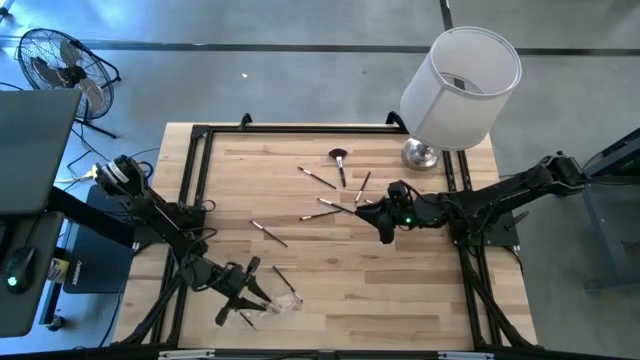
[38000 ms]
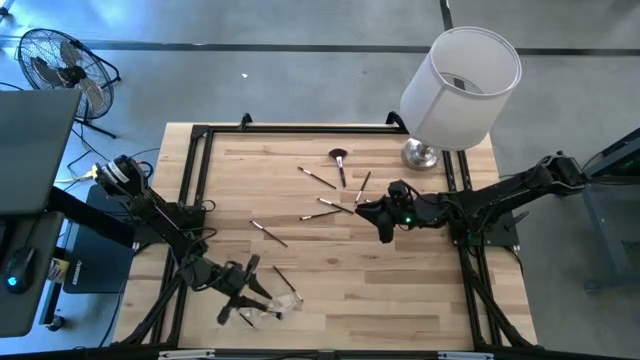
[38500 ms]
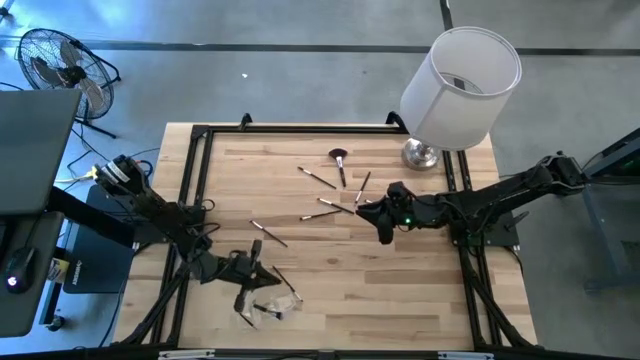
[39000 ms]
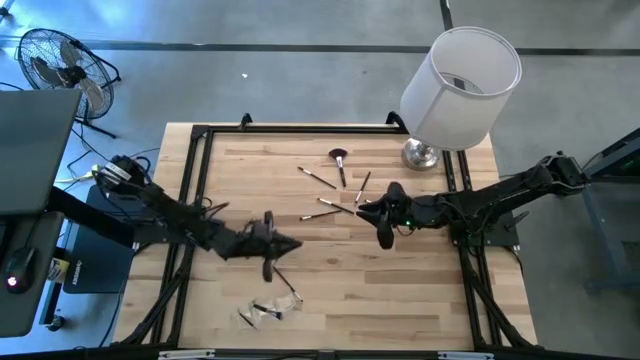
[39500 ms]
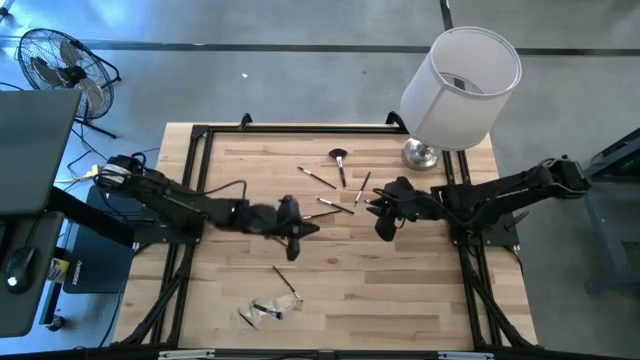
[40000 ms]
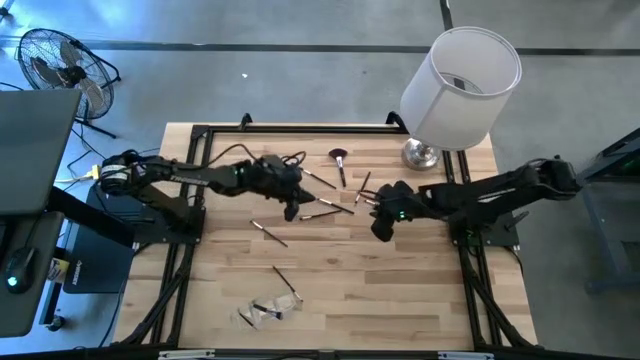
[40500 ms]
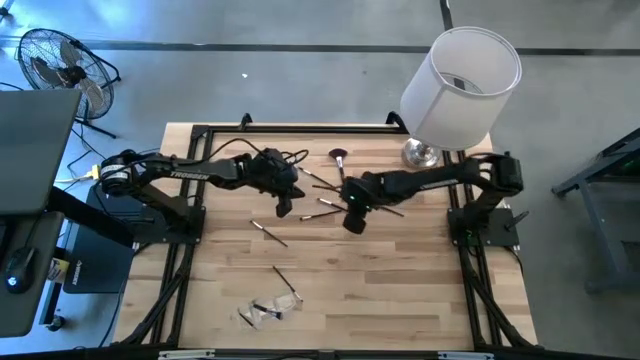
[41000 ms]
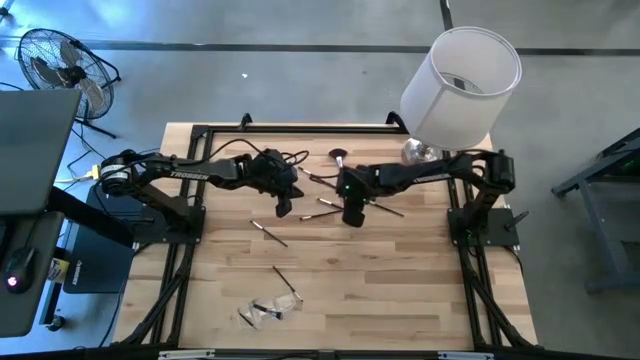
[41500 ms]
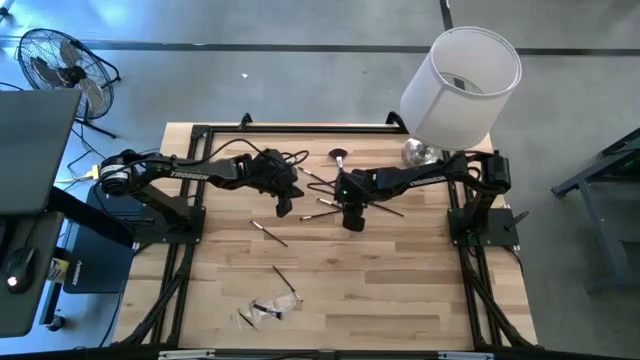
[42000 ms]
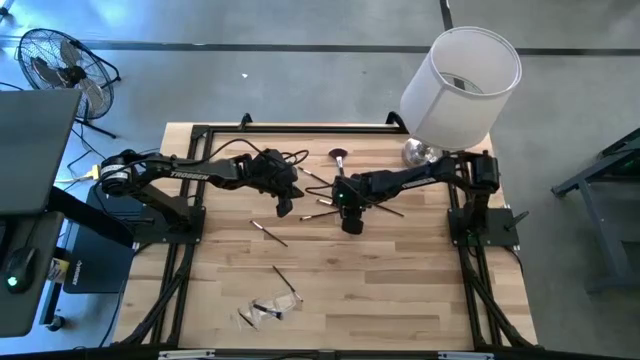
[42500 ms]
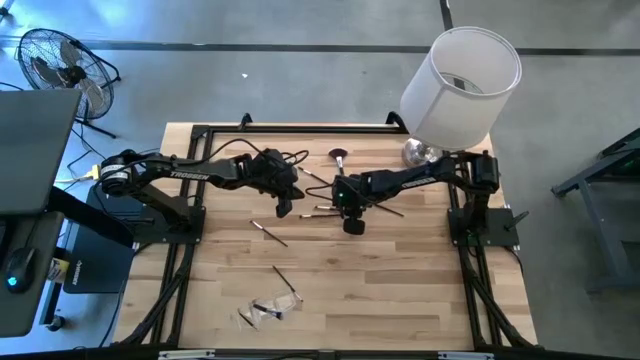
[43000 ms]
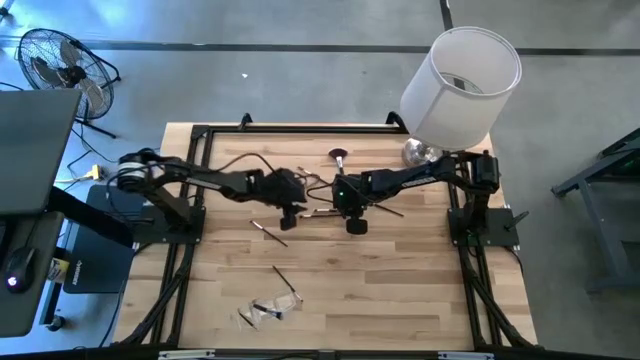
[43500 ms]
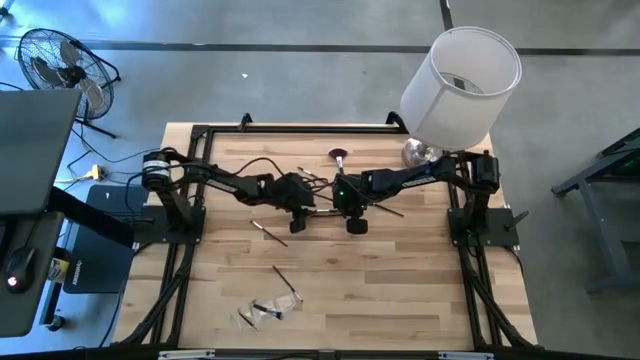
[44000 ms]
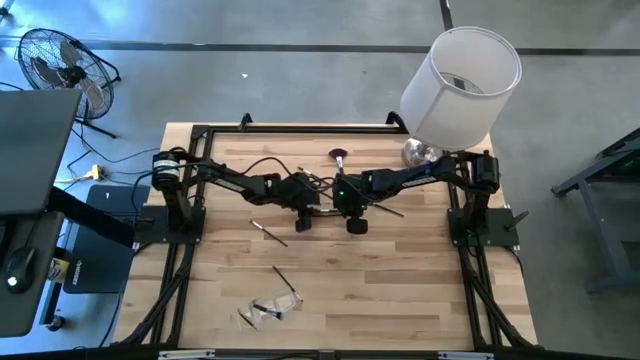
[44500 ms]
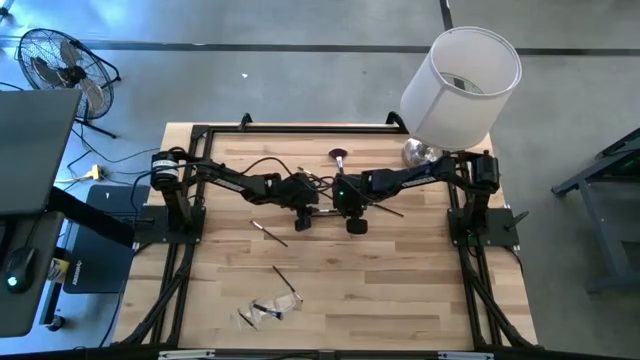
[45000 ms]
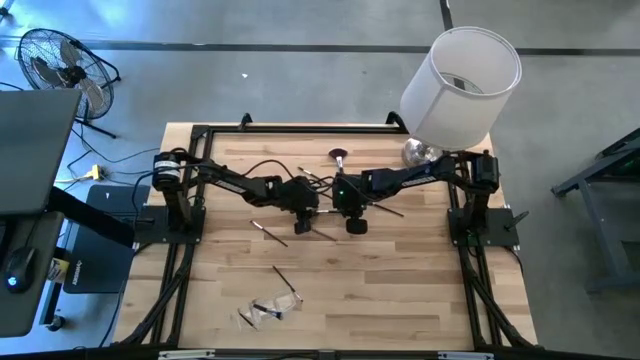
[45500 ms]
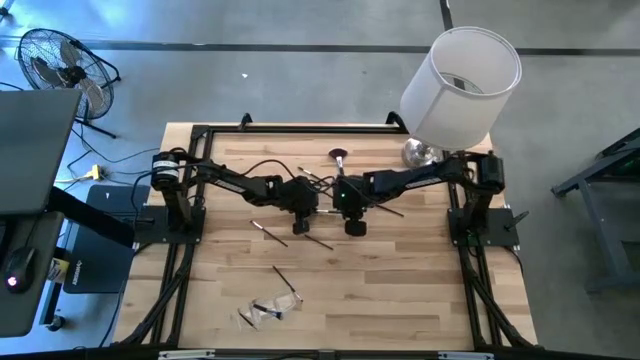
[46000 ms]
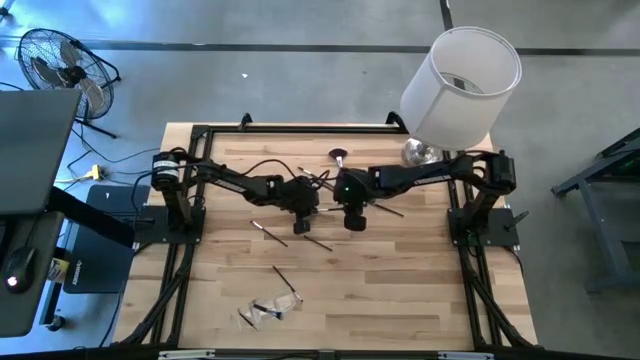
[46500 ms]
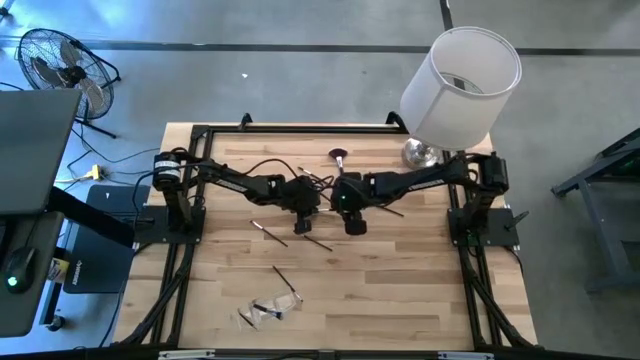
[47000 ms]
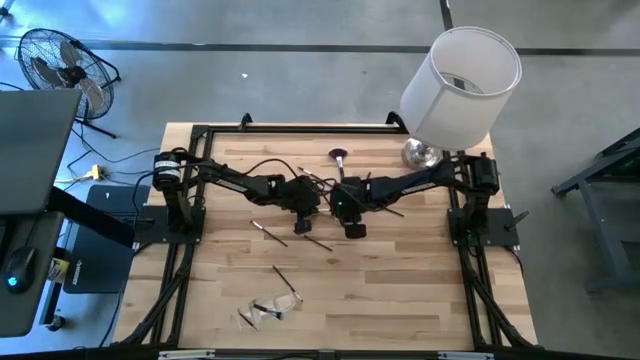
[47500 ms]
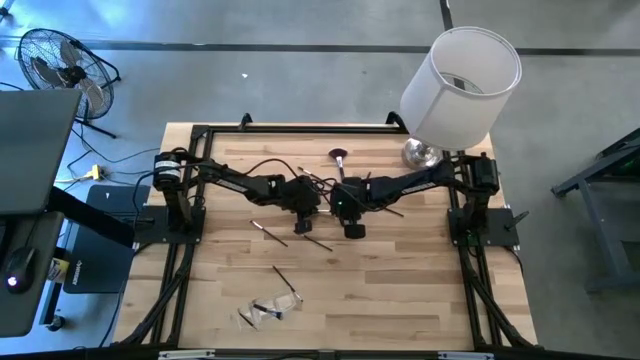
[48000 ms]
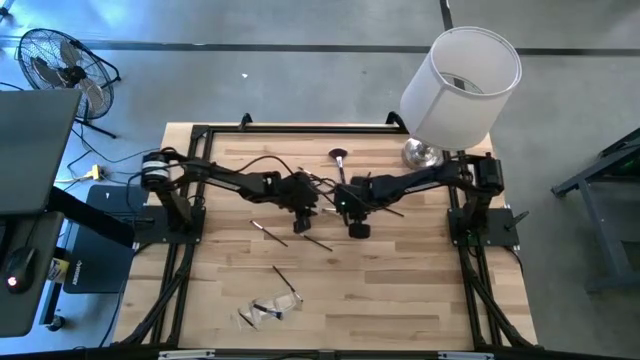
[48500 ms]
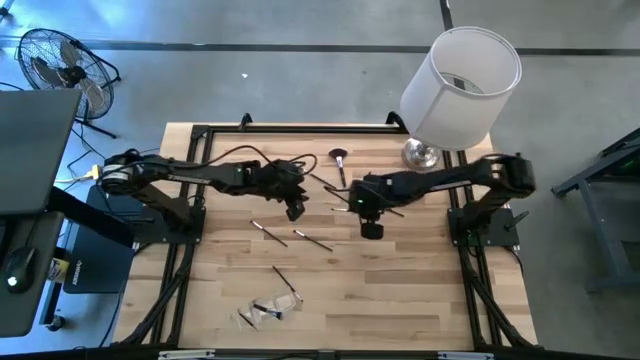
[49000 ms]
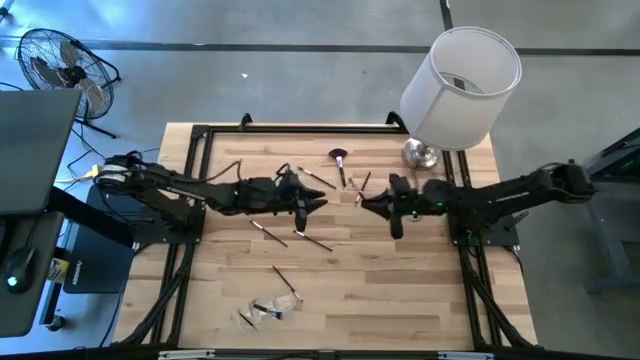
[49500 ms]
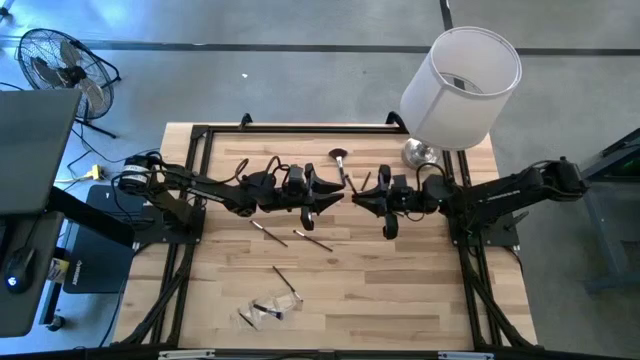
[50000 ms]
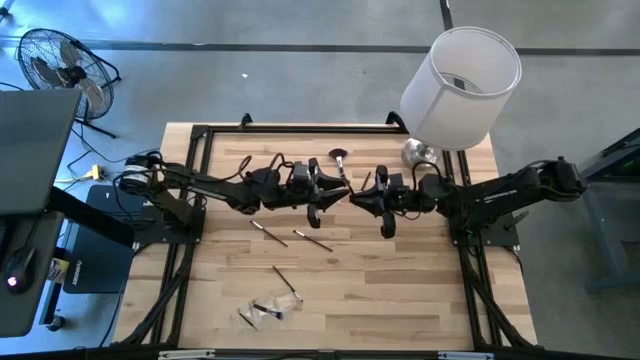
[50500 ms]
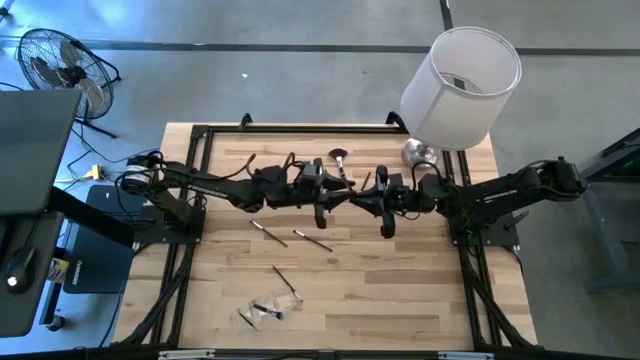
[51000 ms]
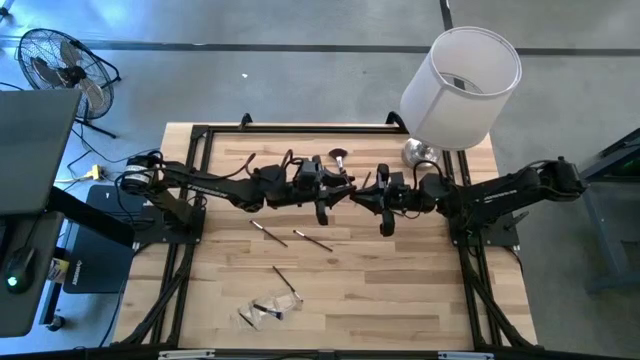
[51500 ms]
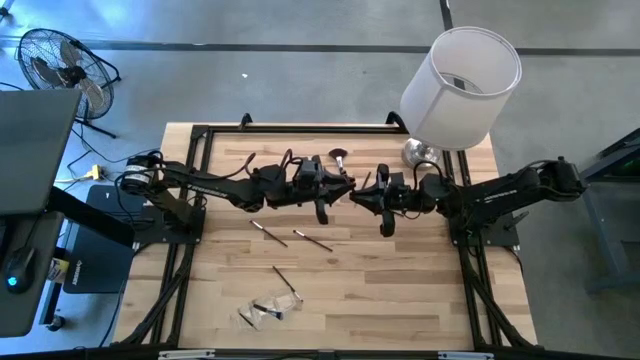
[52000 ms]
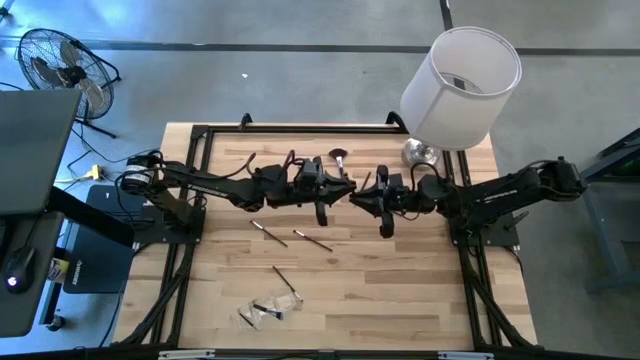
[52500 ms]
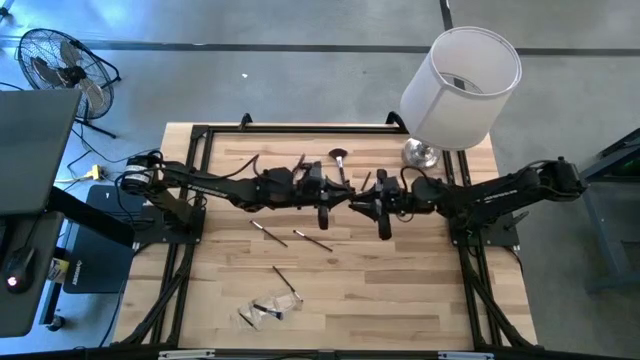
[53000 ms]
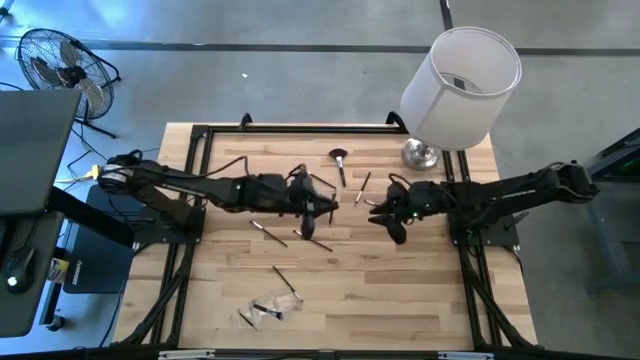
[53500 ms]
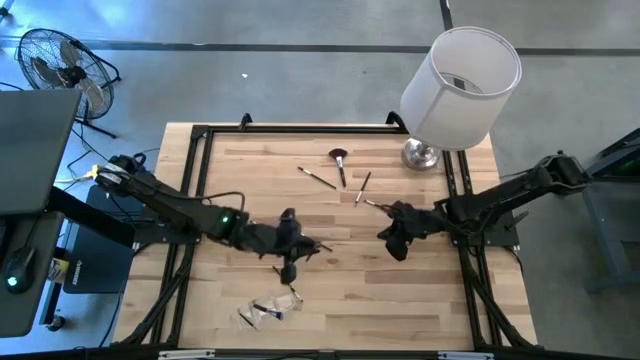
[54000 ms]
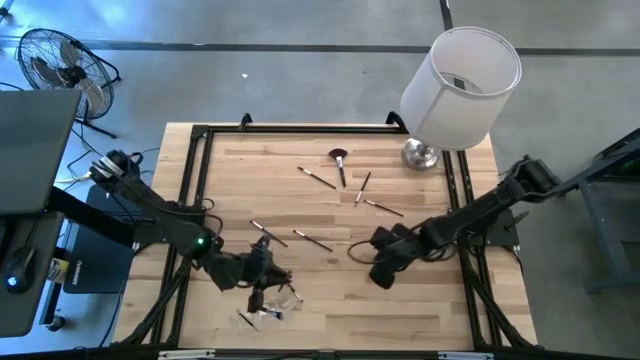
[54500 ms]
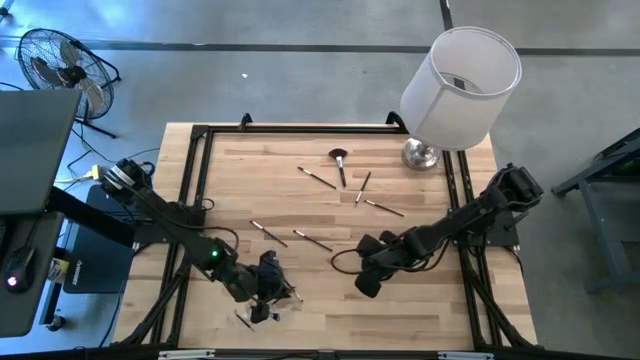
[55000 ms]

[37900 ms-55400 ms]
Task: Pick & Place Makeup Supplies
Put the silver makeup brush into the transparent organizer

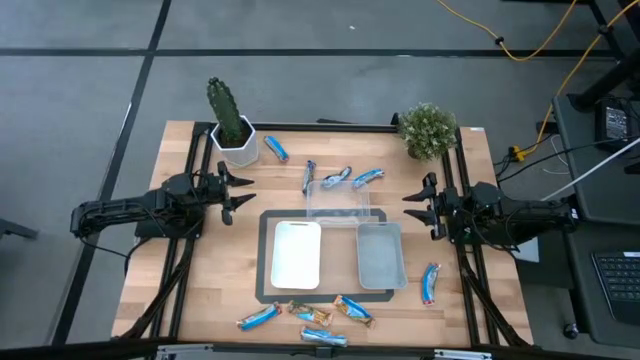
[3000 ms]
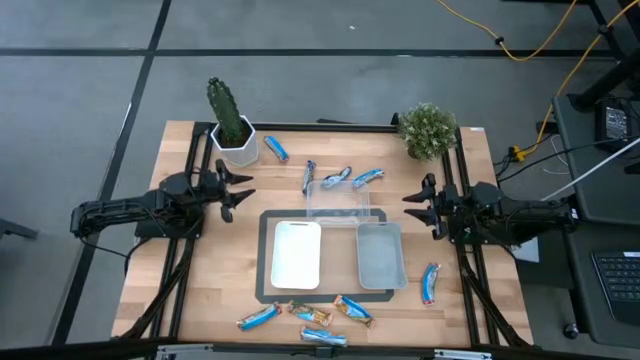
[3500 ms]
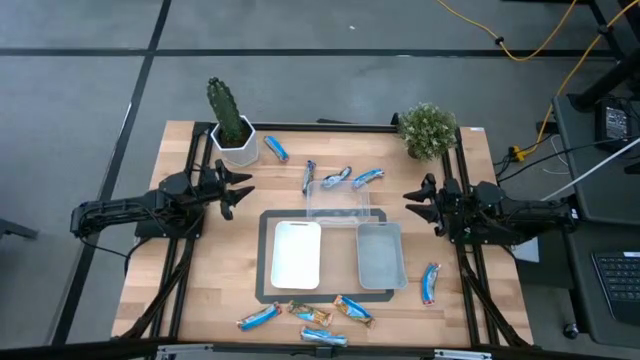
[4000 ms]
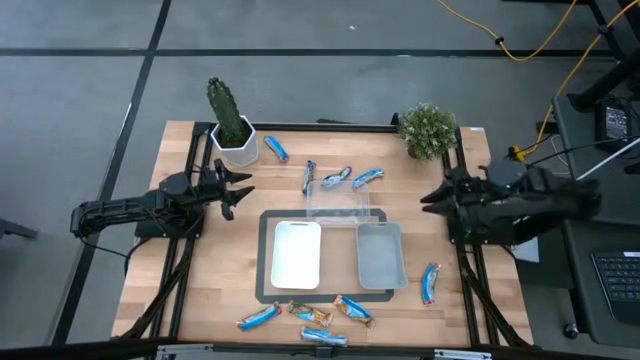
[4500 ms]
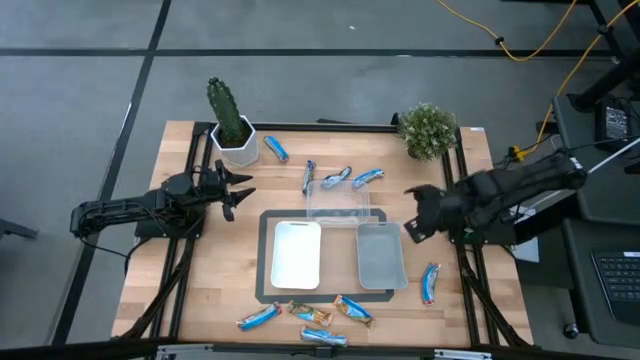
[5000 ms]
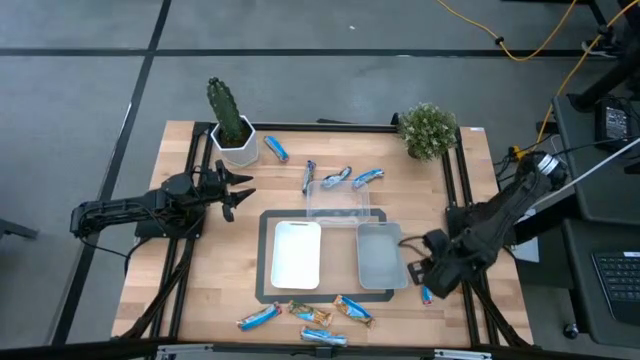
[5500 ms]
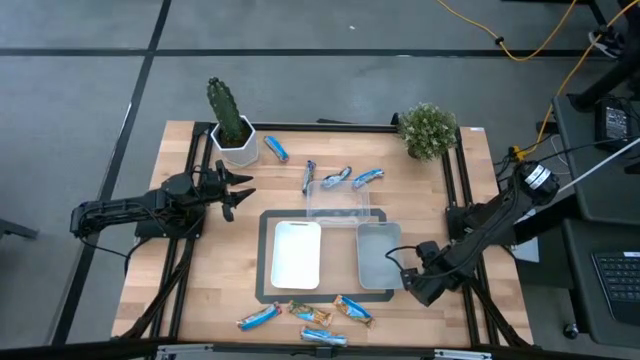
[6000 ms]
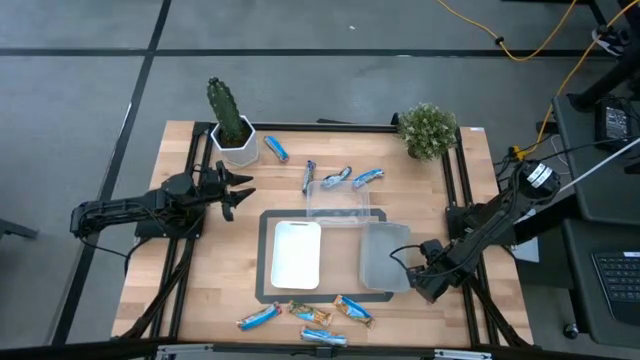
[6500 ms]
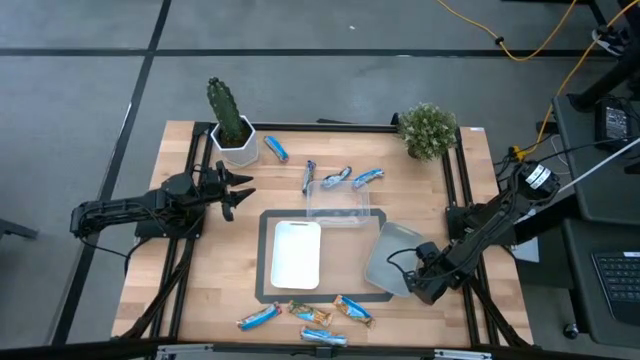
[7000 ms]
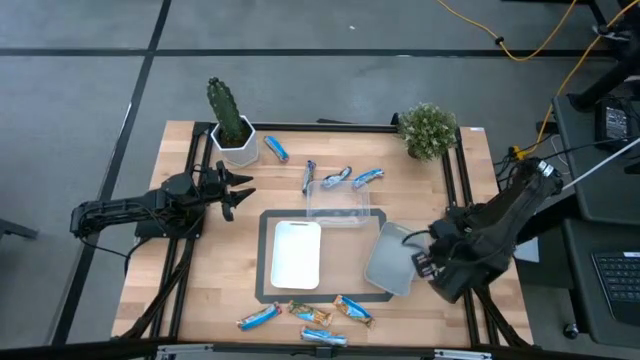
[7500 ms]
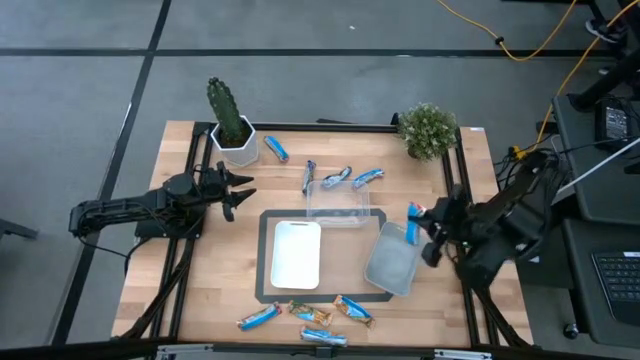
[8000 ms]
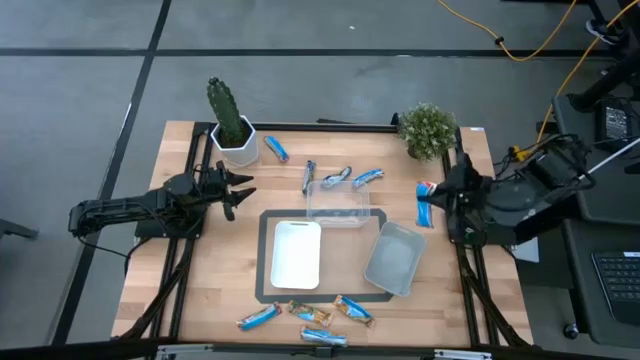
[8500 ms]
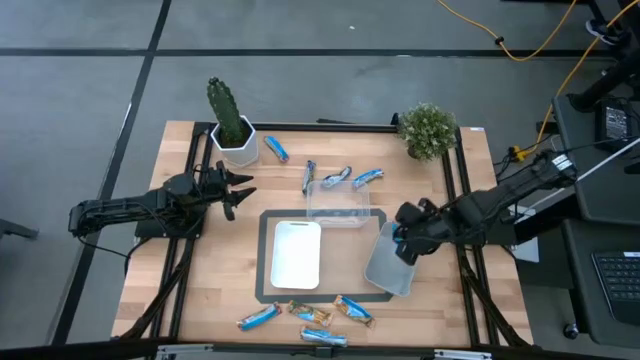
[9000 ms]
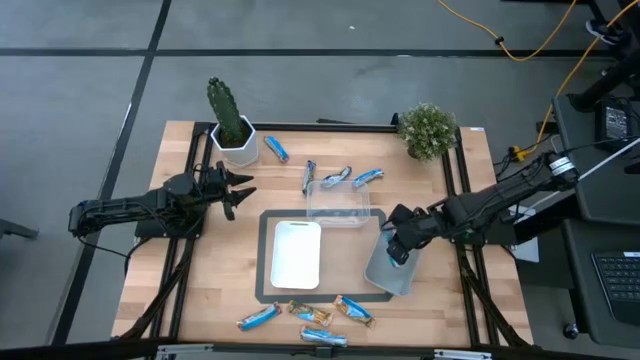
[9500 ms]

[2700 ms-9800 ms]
Task: Pick and place Granola Bars by type
Put the red granola bar into the gray bin
